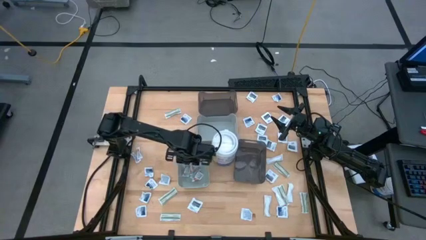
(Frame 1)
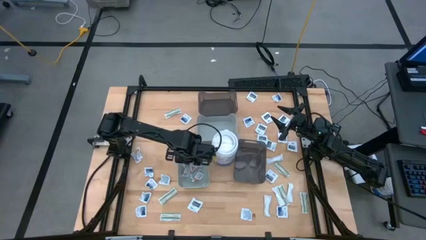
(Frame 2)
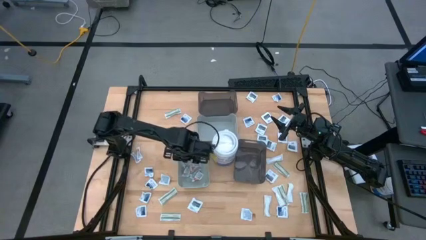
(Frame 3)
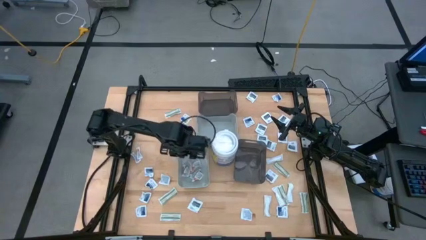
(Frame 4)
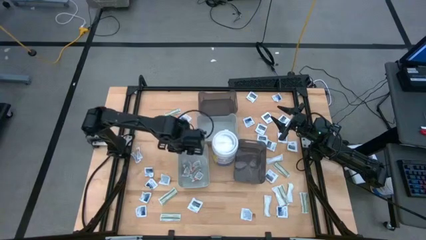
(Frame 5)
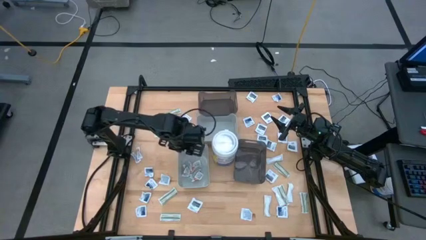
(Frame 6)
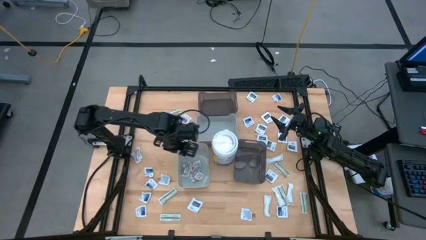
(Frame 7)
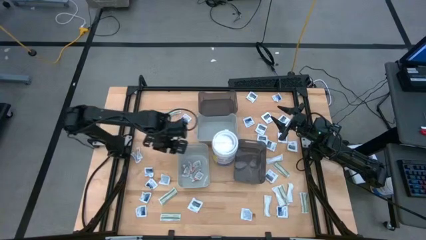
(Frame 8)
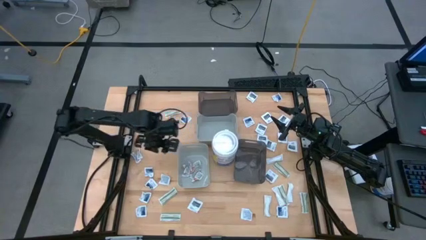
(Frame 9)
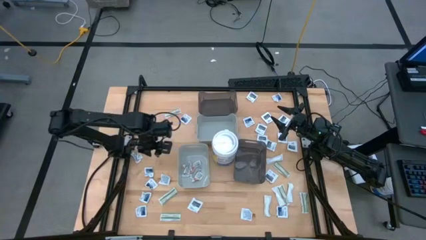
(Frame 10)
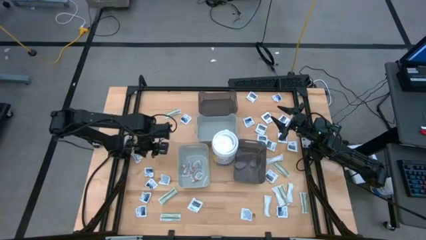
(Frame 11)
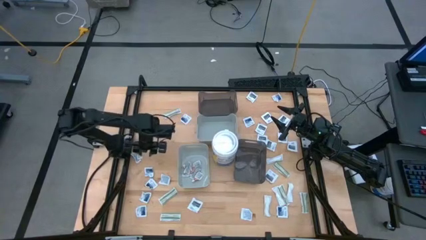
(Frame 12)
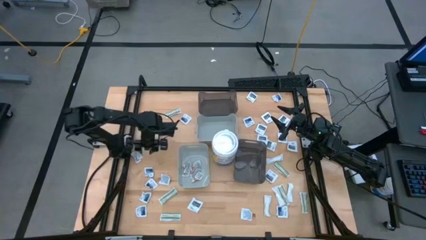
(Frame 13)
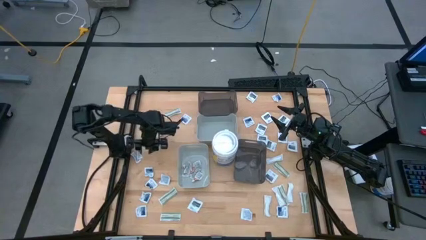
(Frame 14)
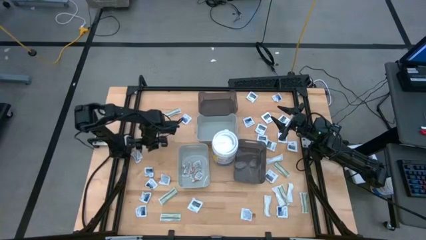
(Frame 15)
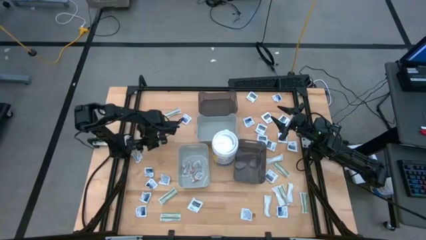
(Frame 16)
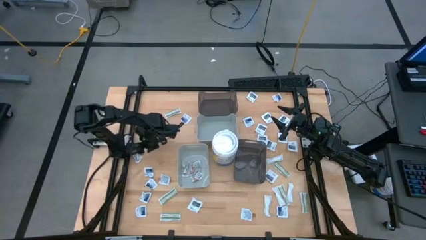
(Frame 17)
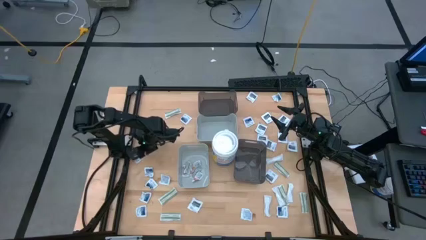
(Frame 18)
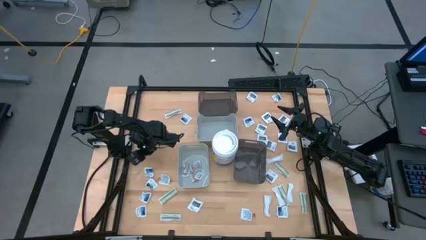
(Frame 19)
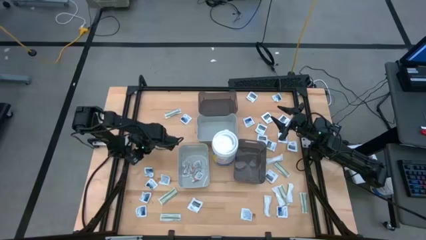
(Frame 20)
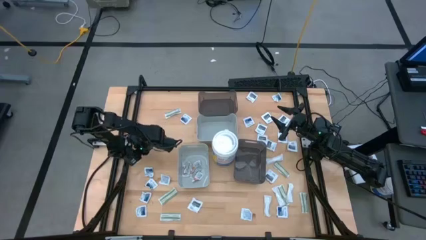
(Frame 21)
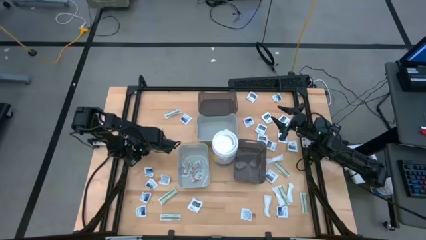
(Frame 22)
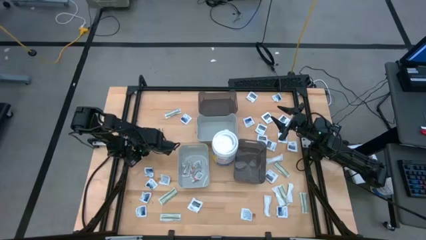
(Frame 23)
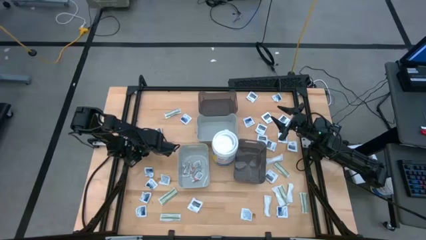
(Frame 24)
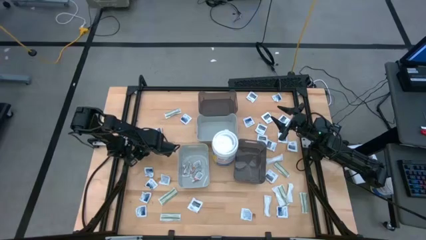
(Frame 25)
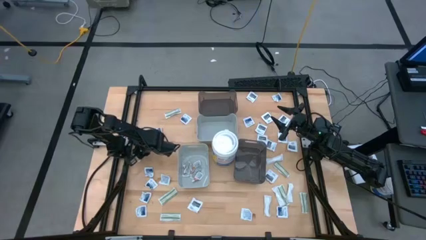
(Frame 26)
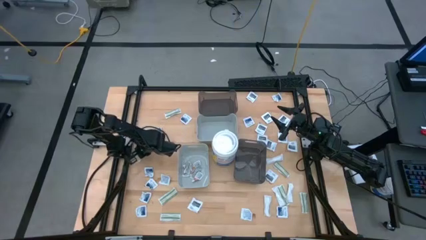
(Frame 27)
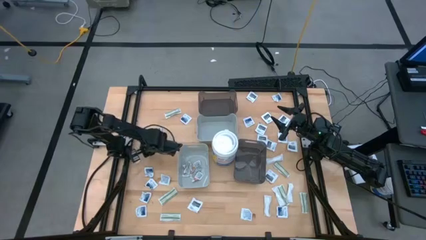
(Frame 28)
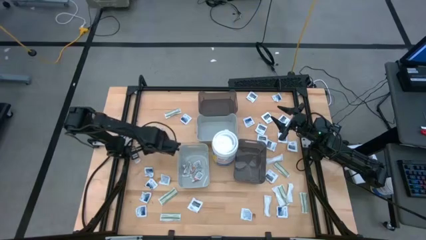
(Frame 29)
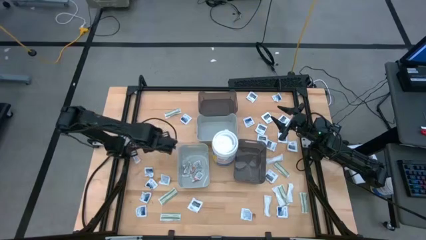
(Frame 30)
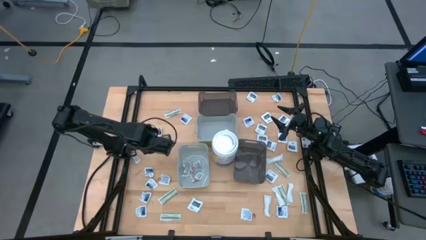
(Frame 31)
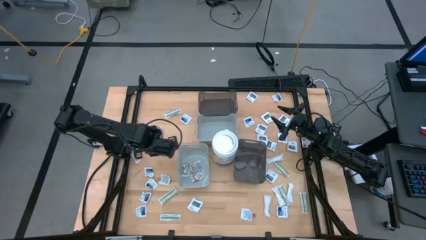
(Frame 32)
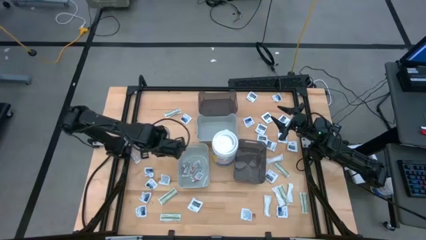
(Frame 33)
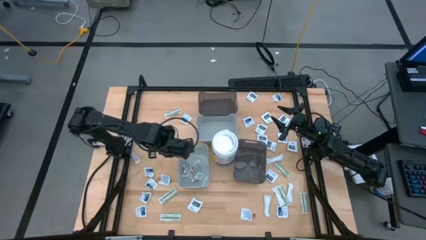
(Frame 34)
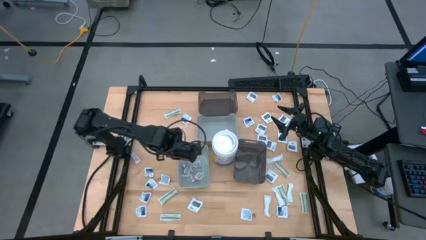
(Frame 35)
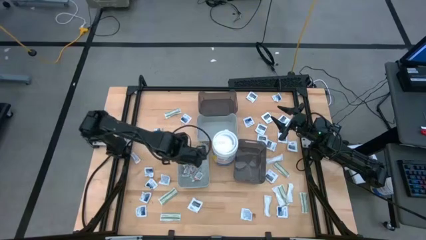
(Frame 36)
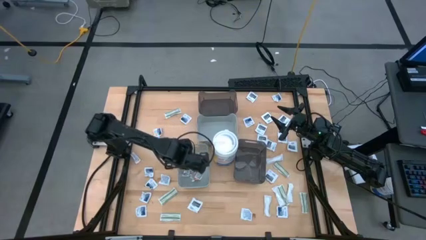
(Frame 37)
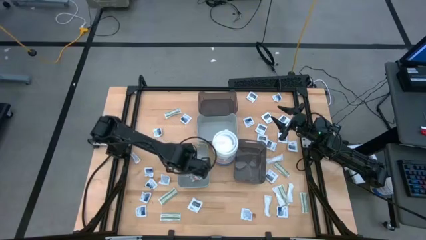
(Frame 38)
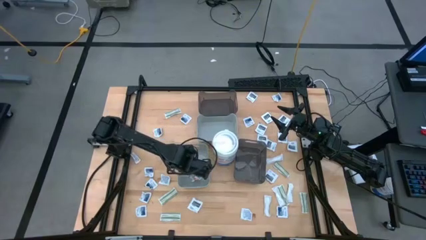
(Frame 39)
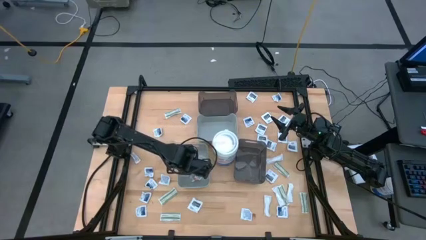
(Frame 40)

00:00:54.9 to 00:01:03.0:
Task: Pick & Place First Aid Supplies
Put the ointment pack into the bottom gray bin

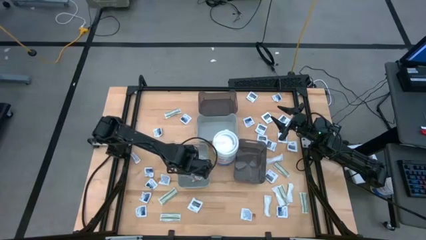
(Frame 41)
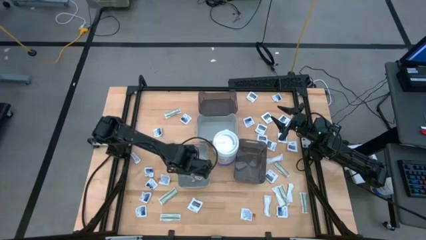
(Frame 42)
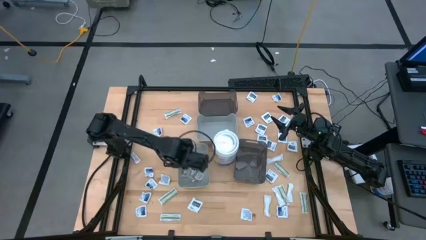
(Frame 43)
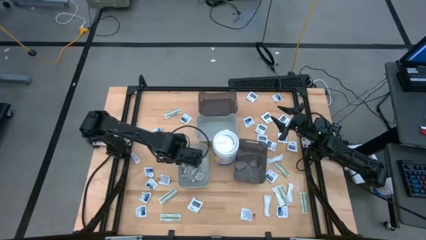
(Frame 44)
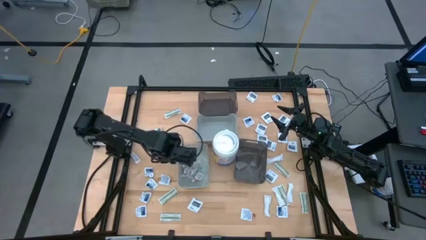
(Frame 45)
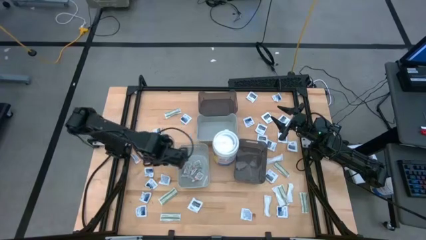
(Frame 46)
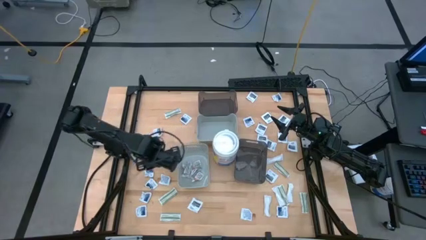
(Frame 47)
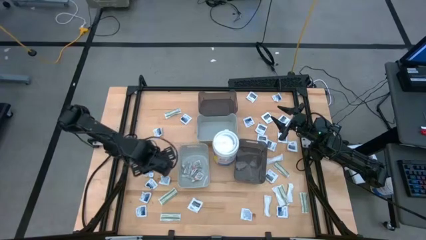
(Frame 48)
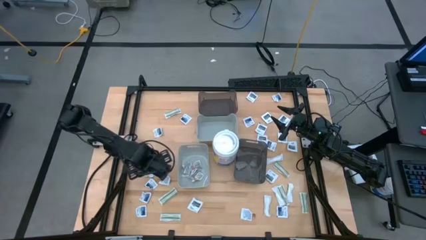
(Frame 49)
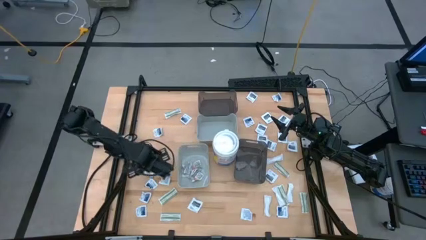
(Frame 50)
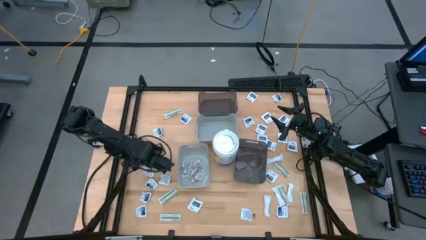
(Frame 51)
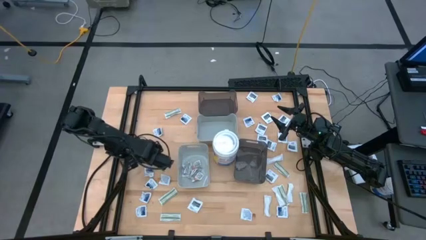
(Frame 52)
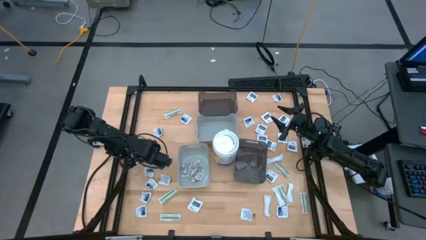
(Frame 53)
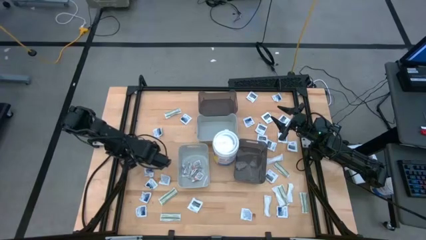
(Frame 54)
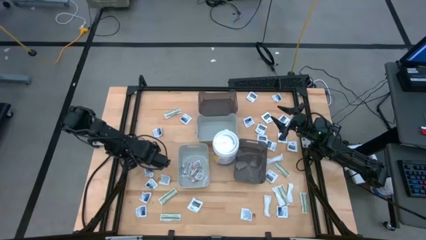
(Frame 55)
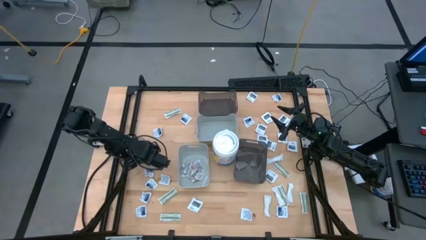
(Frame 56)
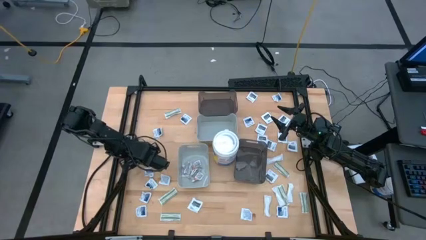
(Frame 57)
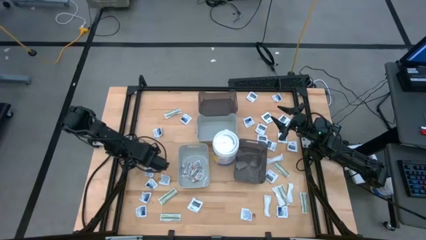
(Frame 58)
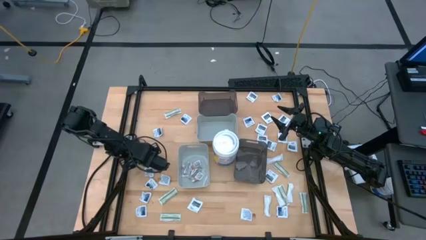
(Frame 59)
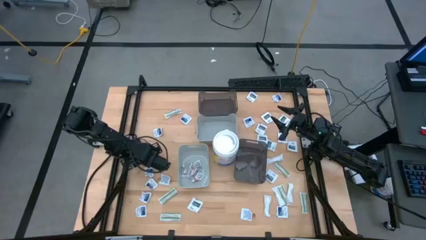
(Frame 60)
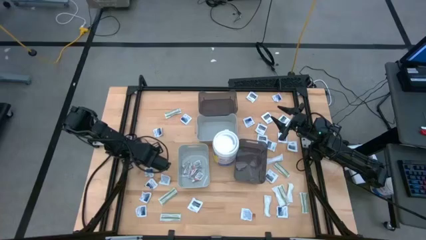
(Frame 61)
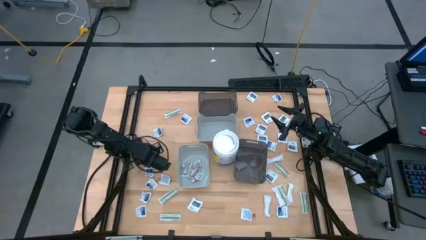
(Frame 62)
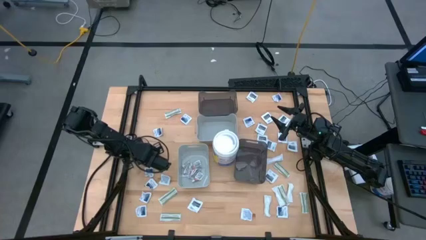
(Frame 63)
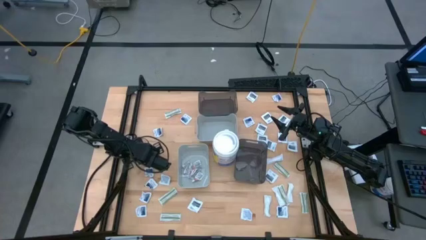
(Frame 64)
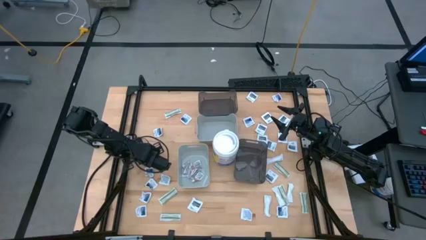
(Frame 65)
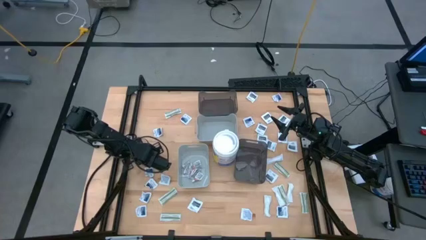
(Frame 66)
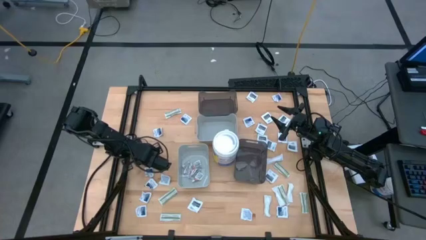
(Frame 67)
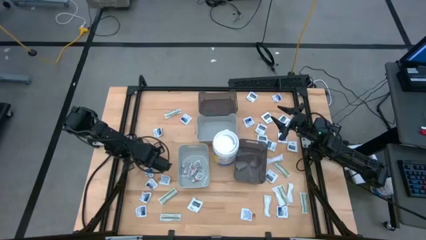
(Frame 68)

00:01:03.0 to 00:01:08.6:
Put the ointment pack into the bottom gray bin

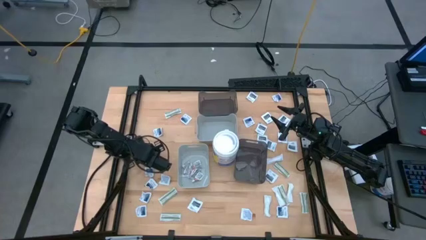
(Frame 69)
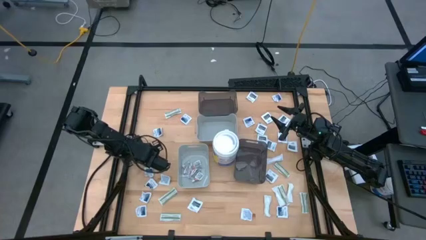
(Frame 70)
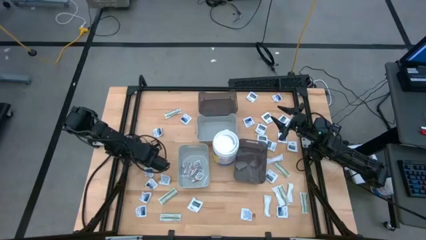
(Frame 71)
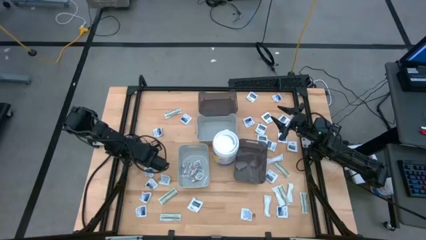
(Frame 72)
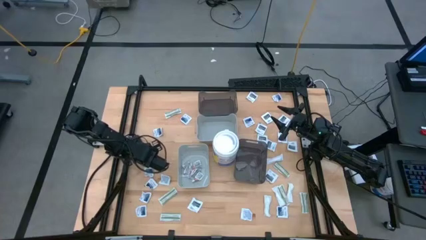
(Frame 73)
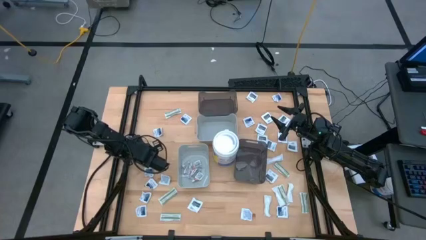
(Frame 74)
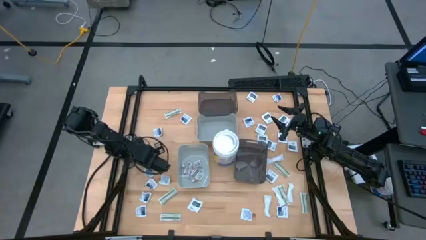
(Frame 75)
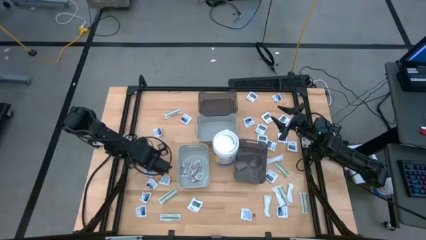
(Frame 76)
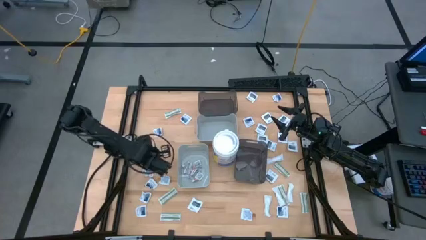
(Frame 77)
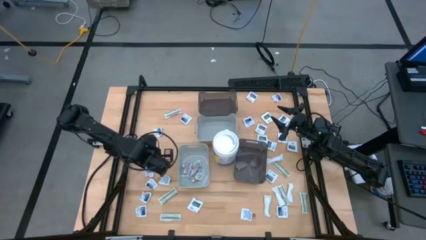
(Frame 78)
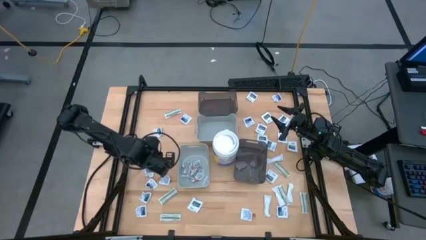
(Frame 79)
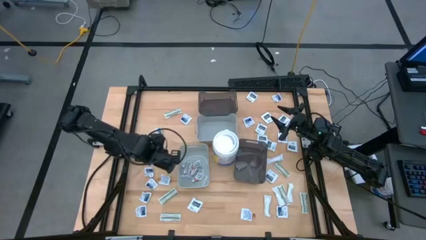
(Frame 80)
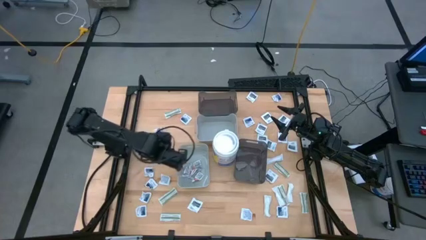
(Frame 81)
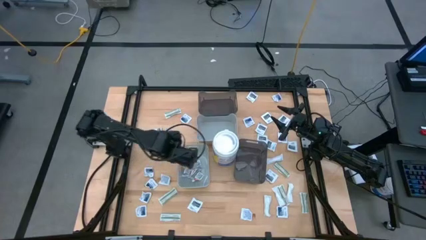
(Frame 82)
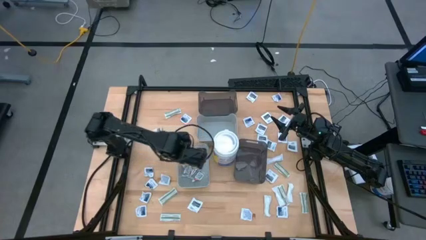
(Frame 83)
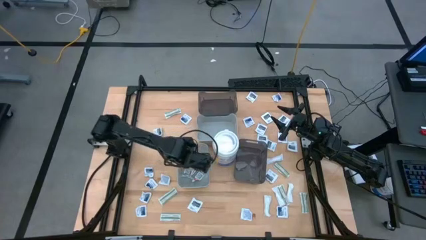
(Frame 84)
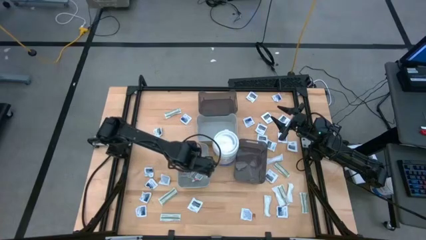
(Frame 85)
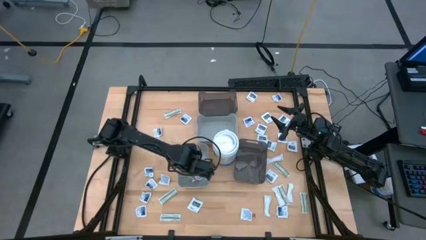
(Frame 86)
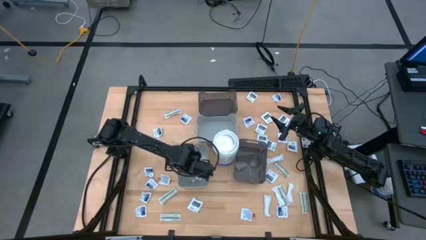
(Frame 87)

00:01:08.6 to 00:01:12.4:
Put the ointment pack into the bottom gray bin
